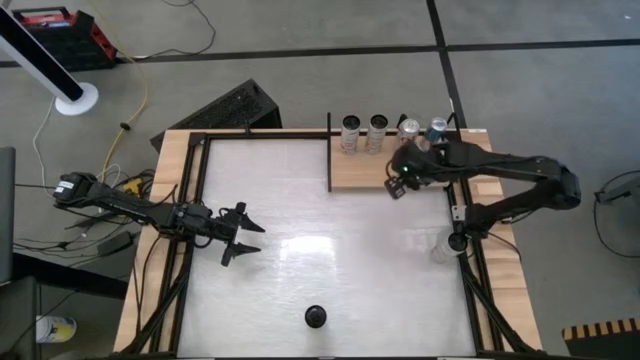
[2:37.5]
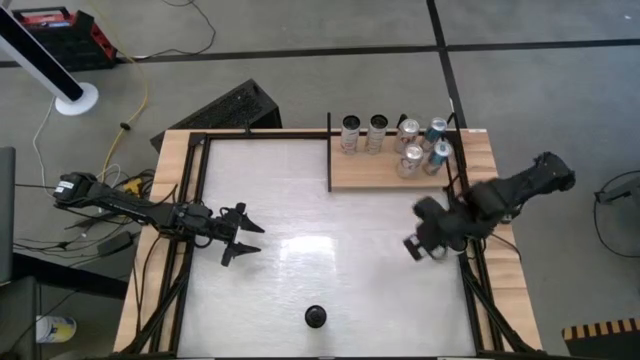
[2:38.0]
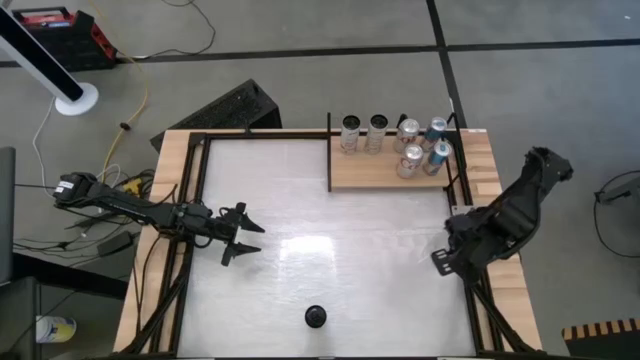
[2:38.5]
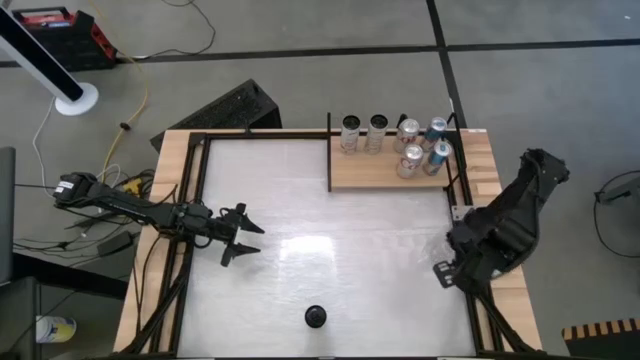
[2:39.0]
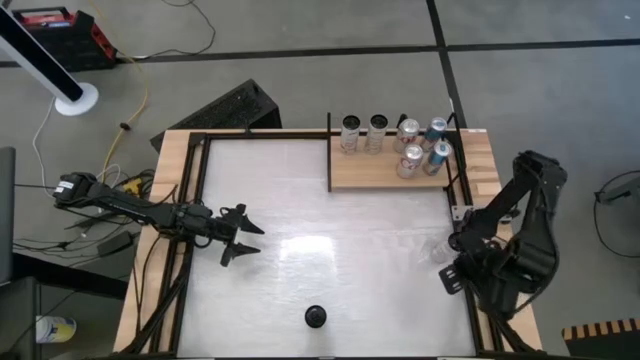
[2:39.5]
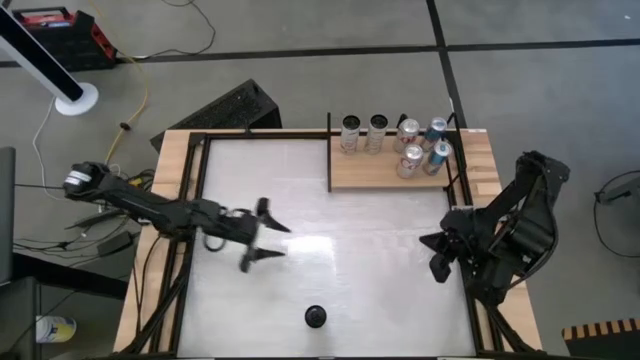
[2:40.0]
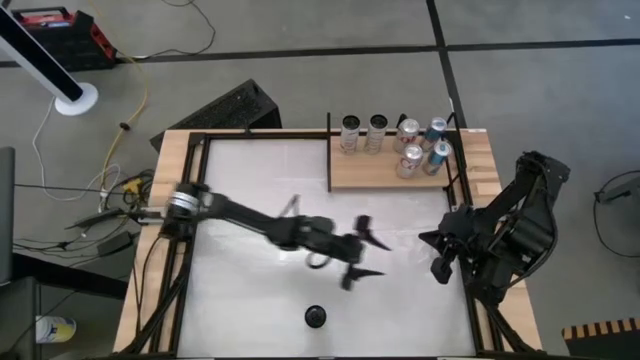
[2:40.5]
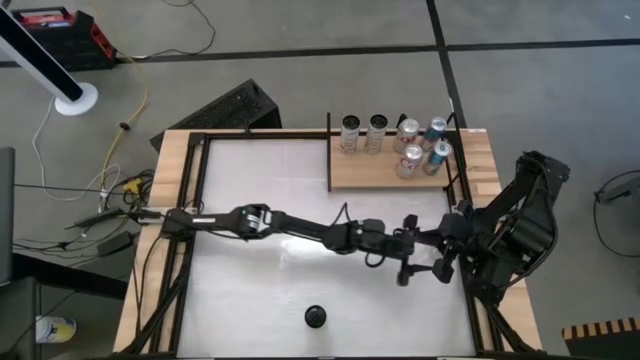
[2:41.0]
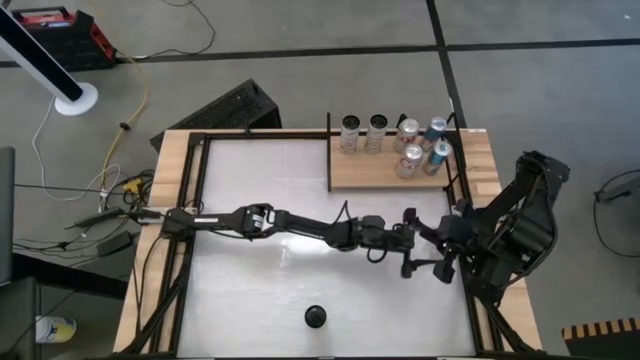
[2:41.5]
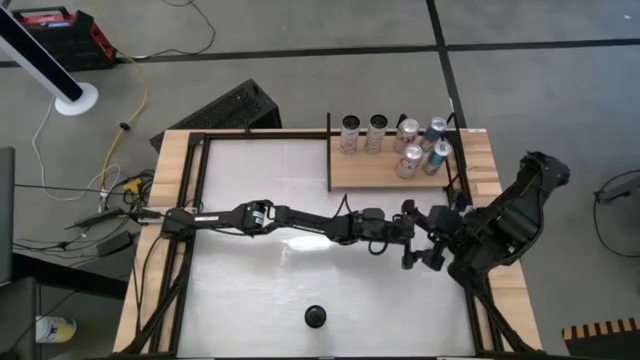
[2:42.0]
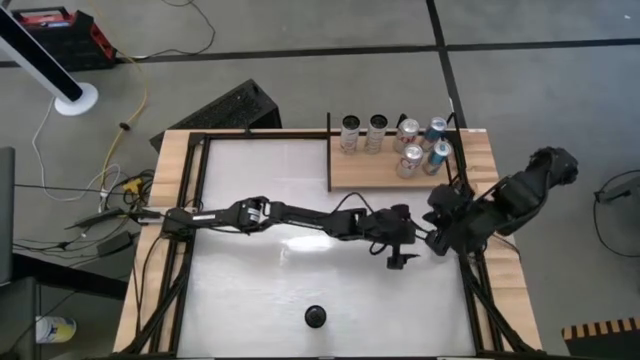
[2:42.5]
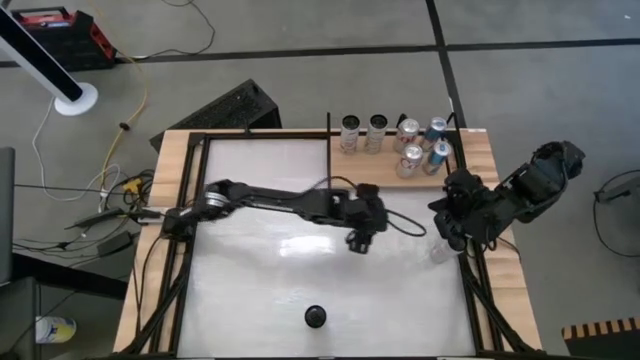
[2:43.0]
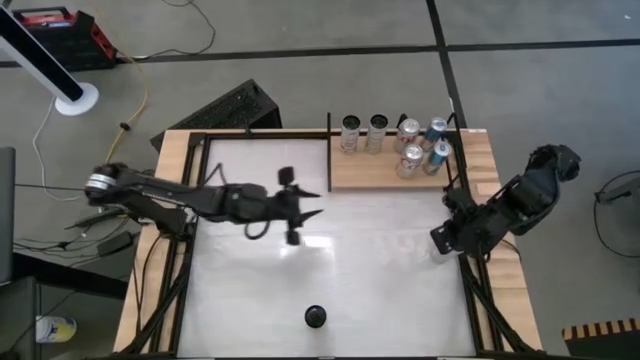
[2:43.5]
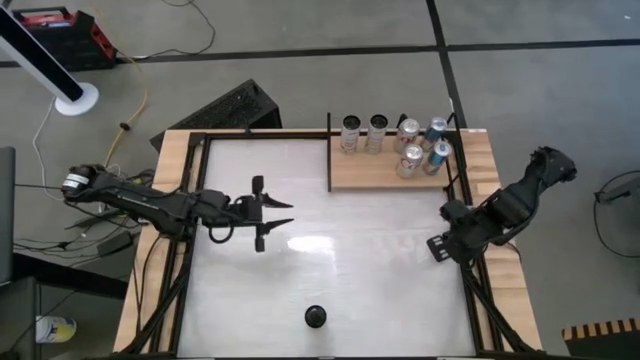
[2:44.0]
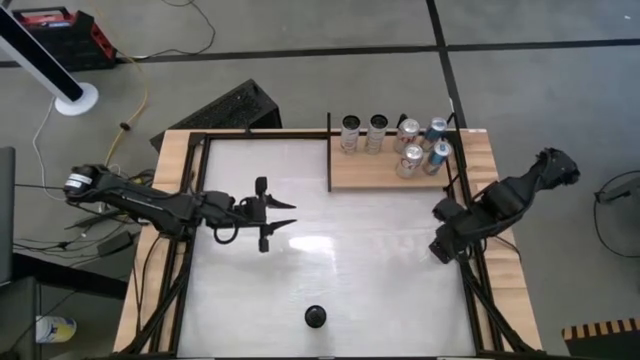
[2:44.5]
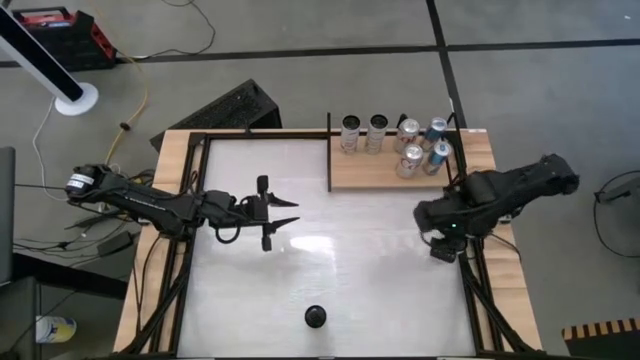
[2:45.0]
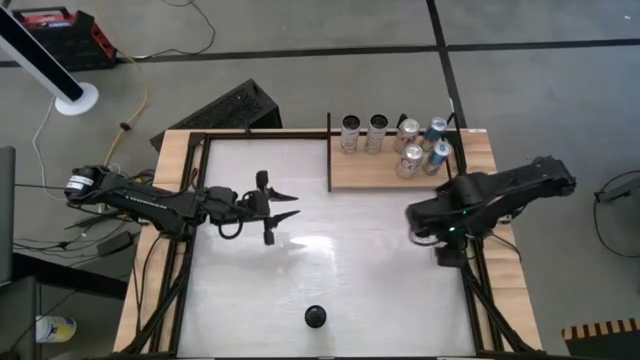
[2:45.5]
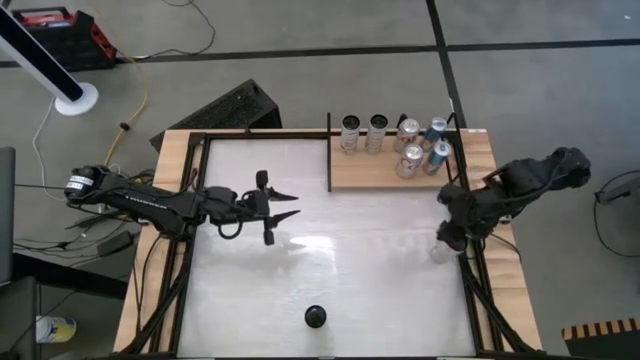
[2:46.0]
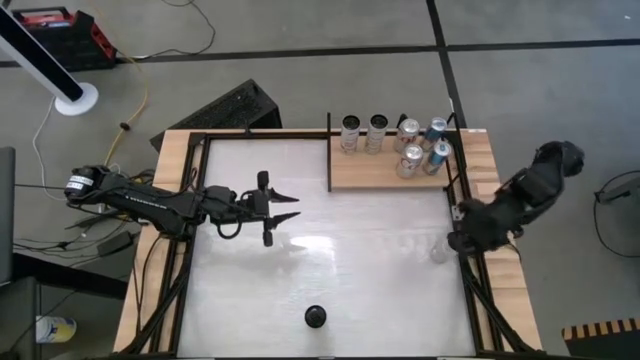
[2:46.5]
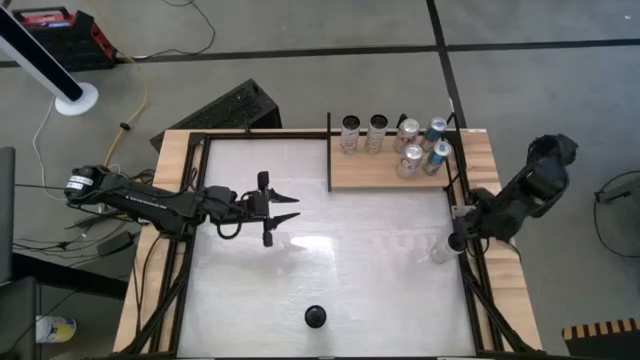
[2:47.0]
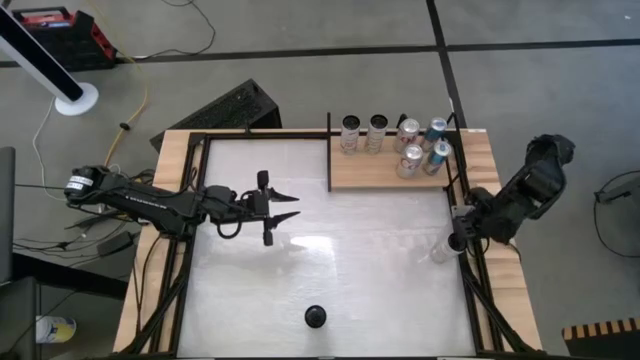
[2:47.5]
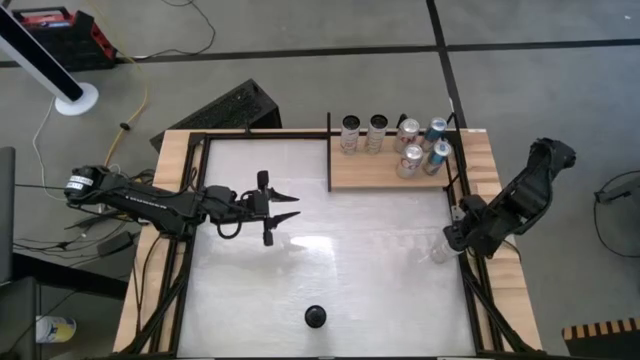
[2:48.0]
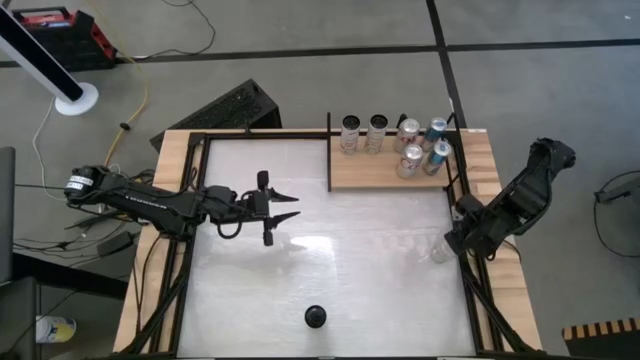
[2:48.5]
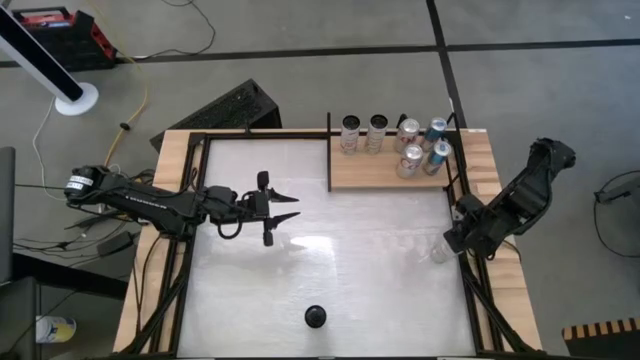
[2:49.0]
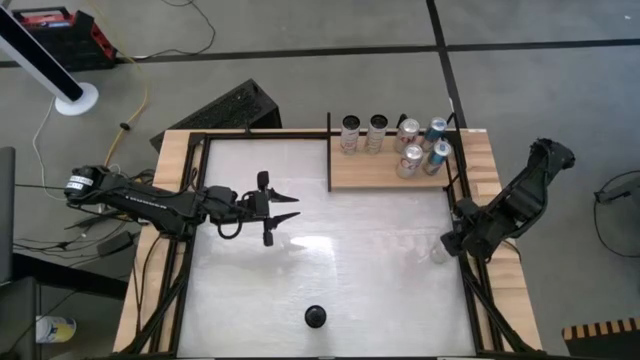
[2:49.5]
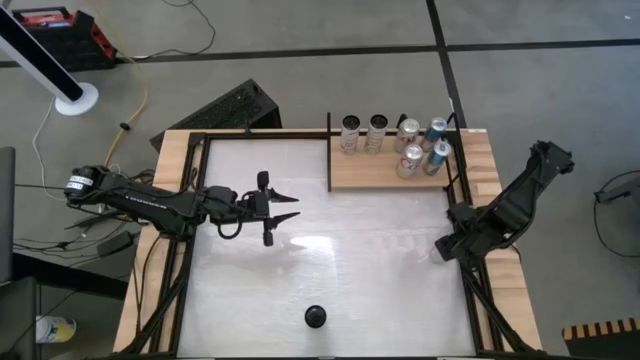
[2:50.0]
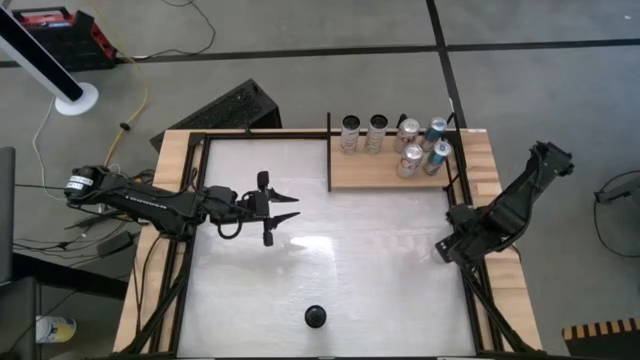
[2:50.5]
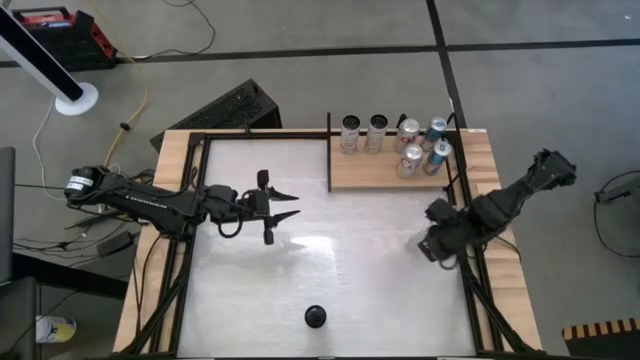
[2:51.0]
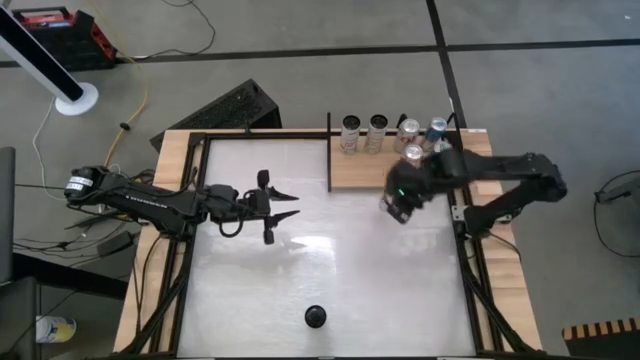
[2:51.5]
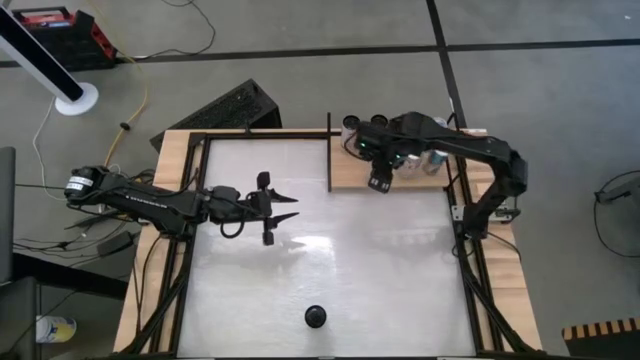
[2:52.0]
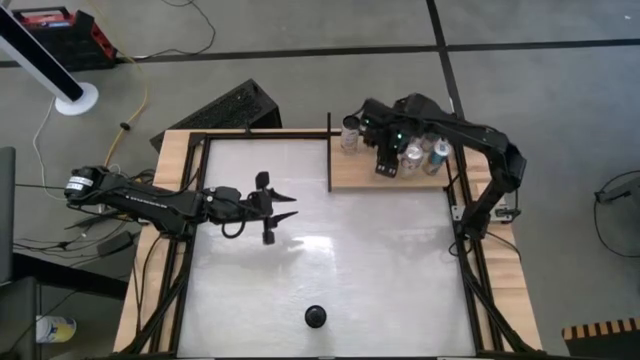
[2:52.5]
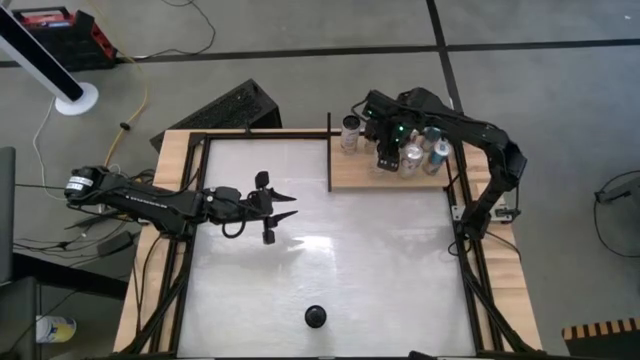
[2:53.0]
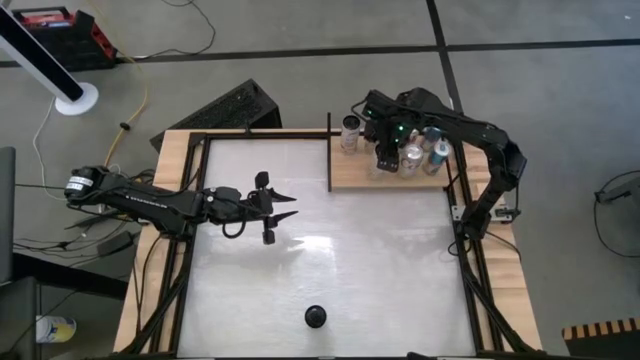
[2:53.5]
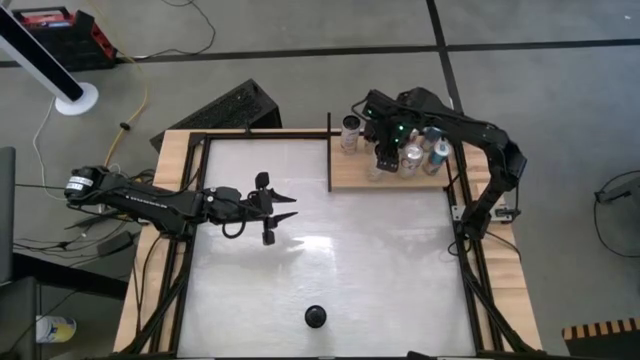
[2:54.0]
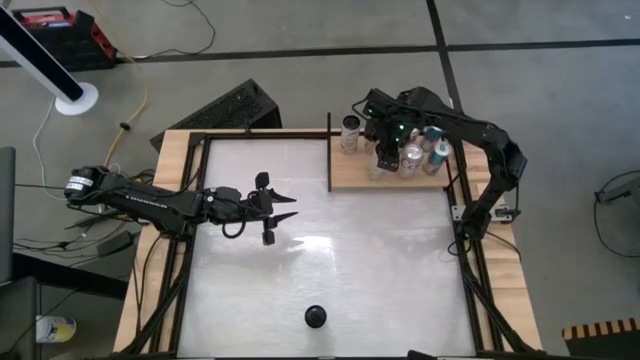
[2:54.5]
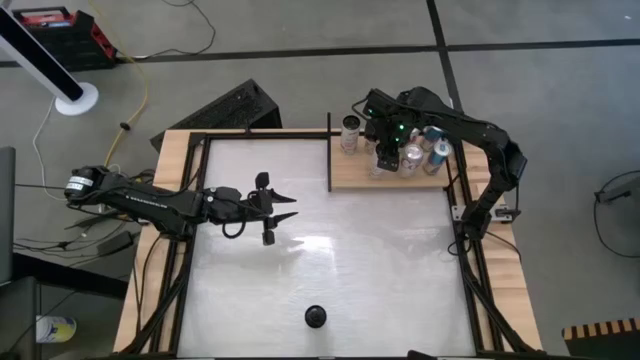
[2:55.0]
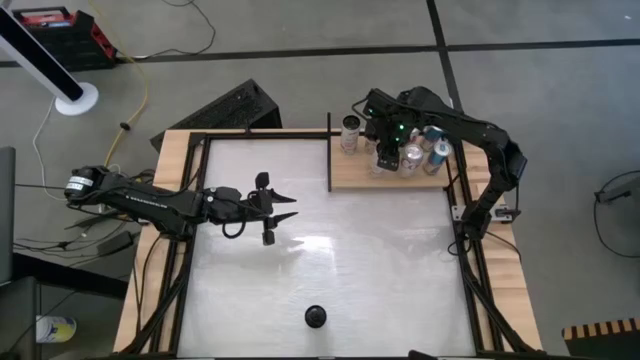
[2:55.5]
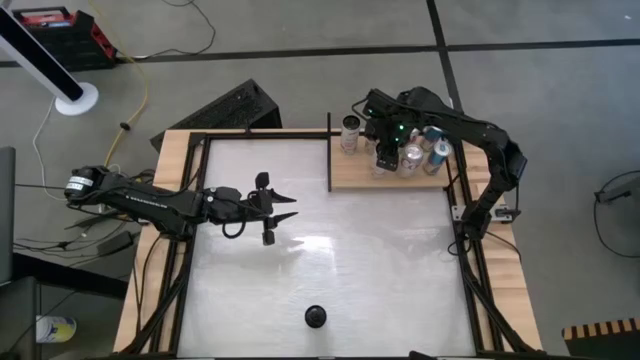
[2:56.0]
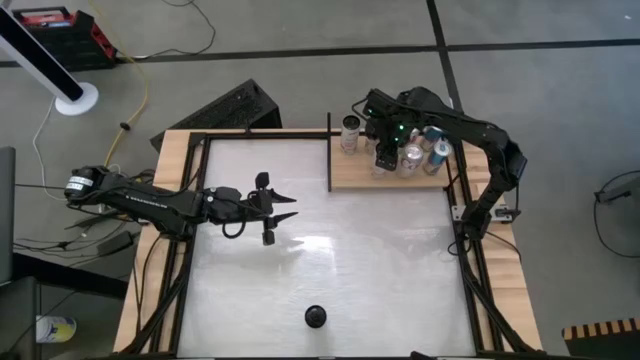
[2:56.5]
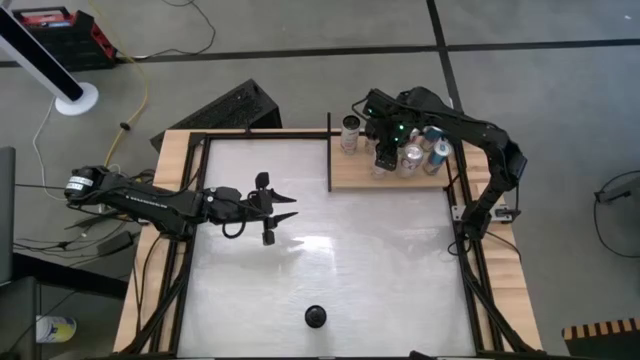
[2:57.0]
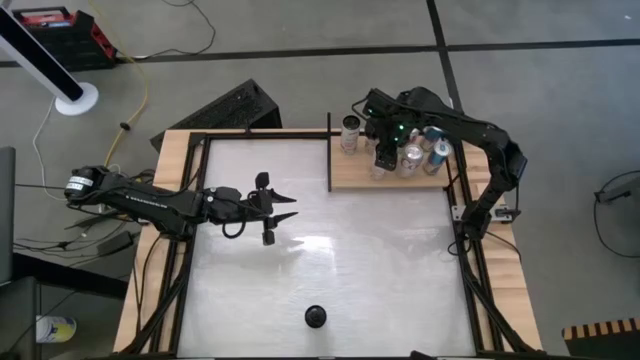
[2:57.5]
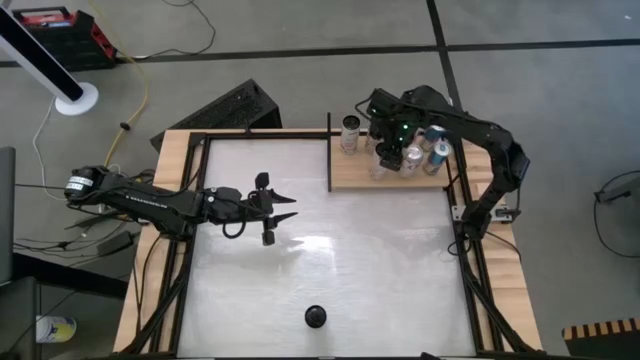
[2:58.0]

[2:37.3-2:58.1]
Task: Place canned beverage on shelf
Put the white and yellow soda can on the shelf aligned with the other white and yellow soda can
